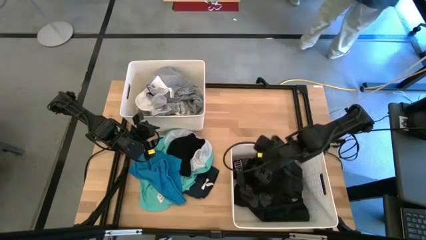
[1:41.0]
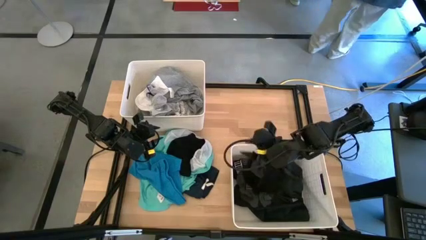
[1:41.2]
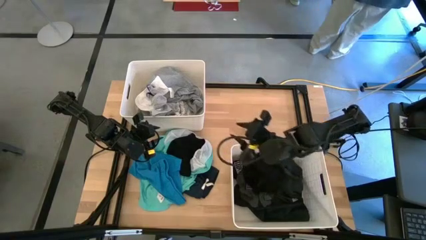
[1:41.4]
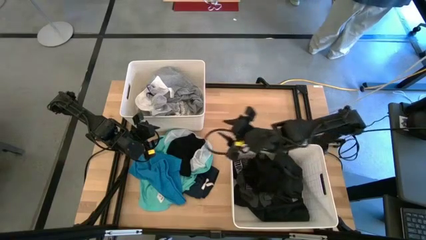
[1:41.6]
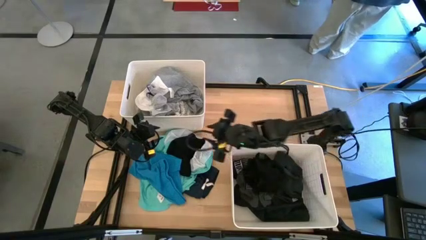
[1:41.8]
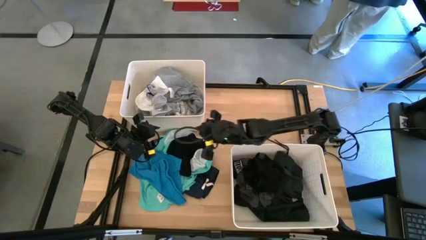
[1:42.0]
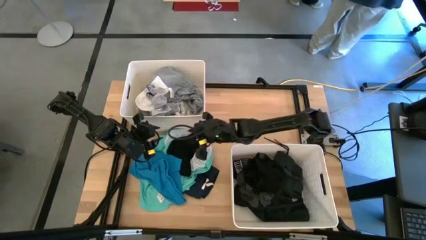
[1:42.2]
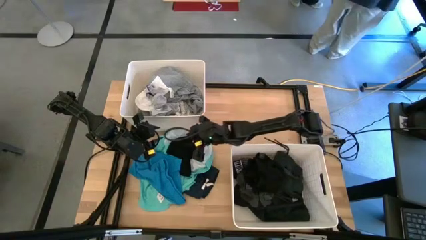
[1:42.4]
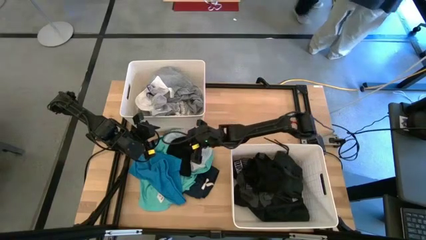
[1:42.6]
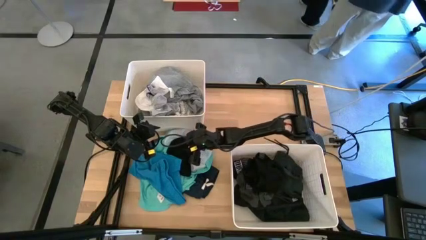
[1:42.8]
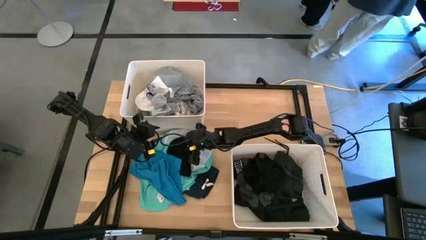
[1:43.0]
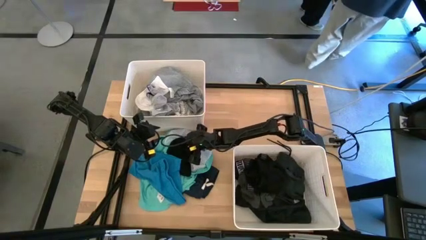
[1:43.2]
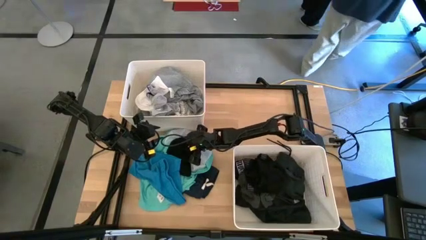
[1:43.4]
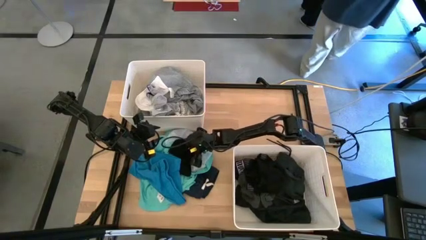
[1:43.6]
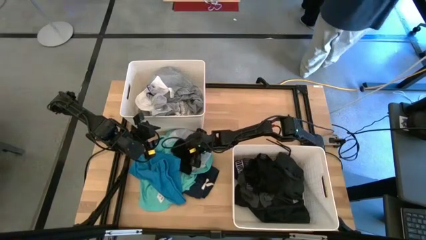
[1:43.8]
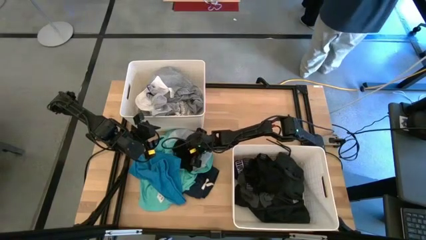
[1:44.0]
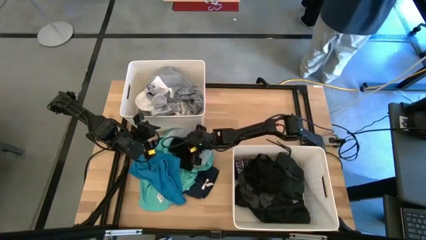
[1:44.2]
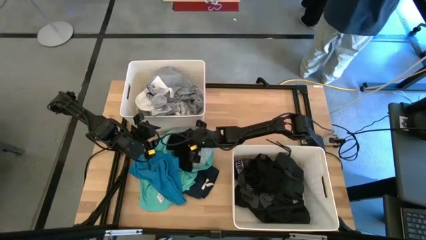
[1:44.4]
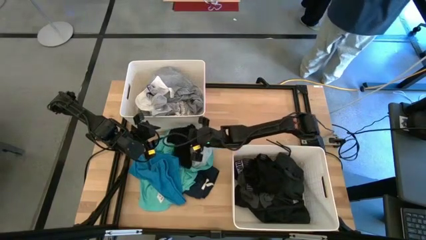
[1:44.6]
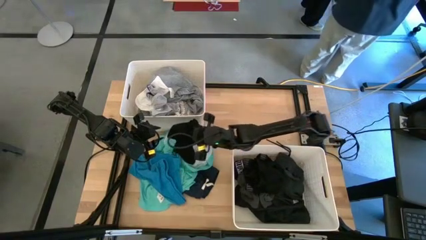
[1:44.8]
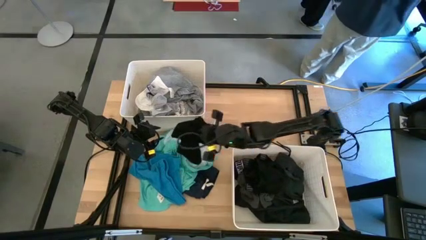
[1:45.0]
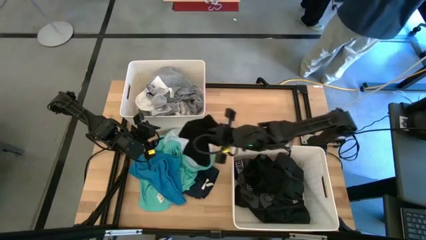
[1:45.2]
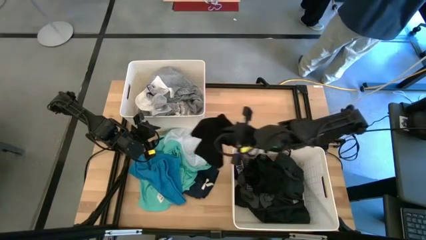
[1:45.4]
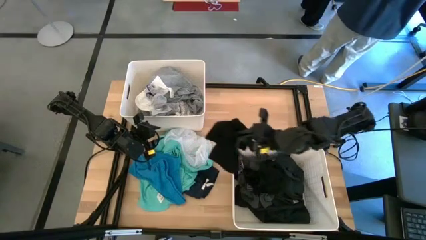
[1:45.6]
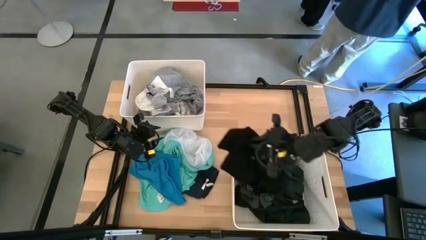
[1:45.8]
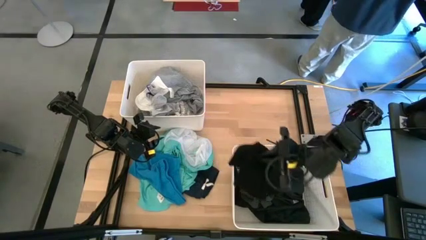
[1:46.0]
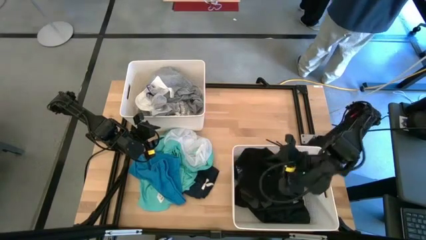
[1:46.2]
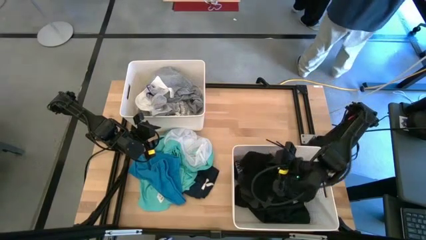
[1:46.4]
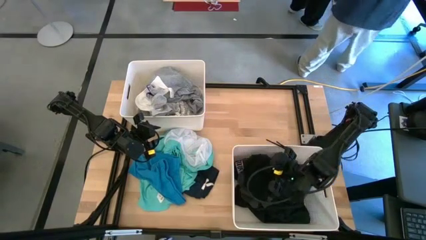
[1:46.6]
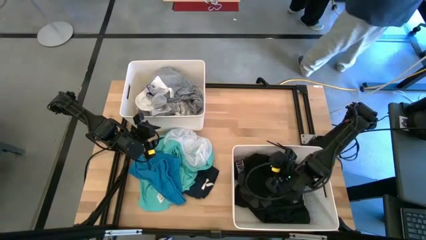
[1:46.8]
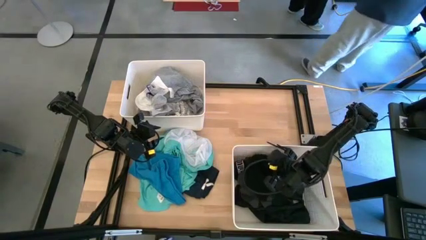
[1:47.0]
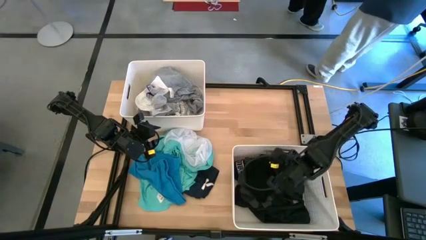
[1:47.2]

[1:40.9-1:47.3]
Task: Sort clothes
Put the black underwear into the bottom right laundry bin

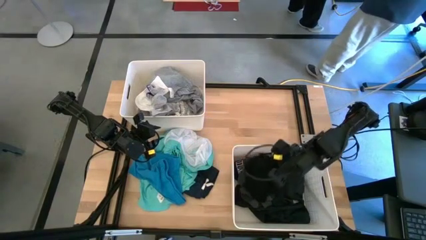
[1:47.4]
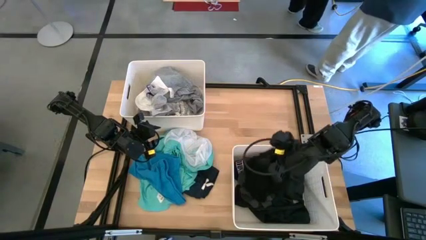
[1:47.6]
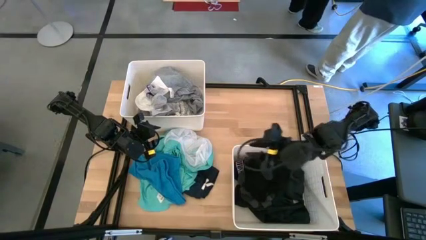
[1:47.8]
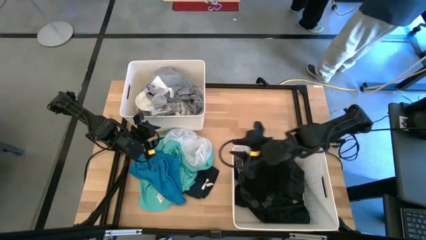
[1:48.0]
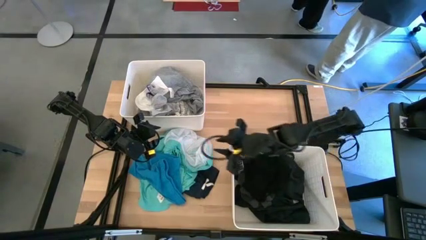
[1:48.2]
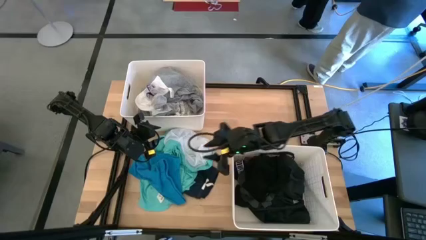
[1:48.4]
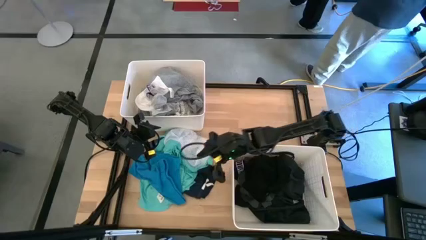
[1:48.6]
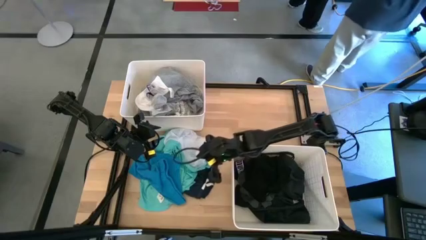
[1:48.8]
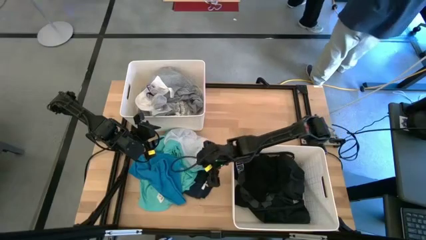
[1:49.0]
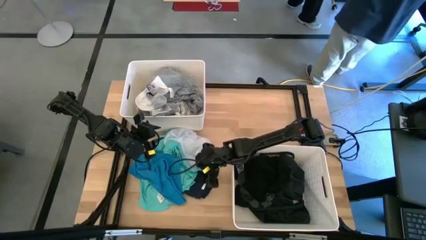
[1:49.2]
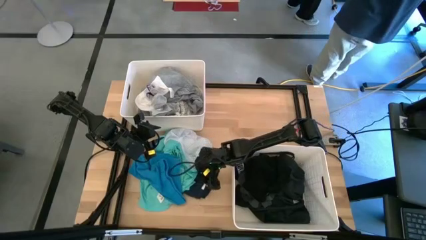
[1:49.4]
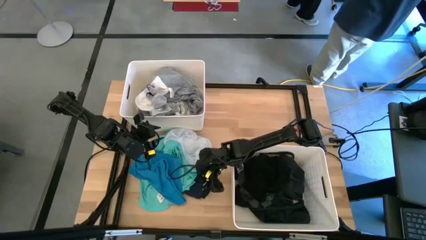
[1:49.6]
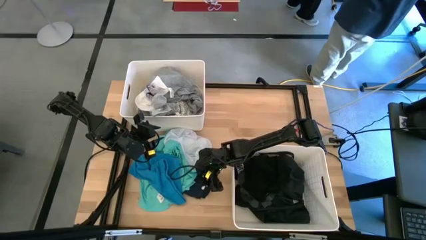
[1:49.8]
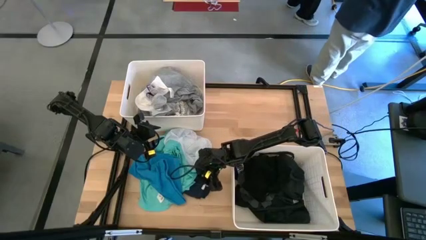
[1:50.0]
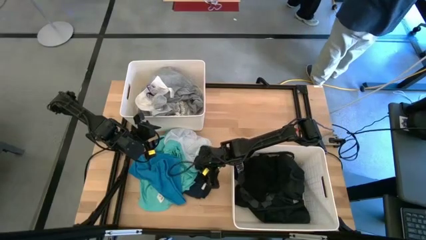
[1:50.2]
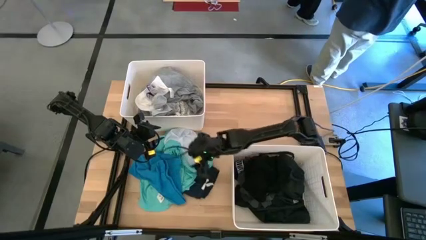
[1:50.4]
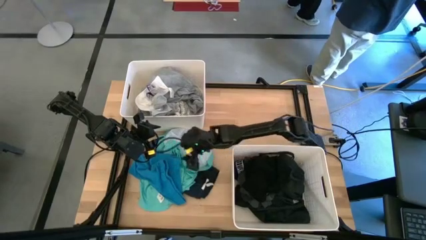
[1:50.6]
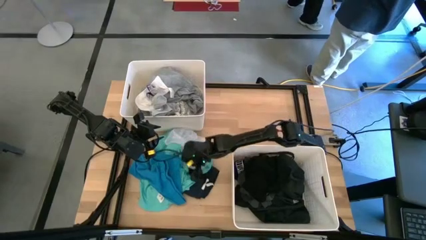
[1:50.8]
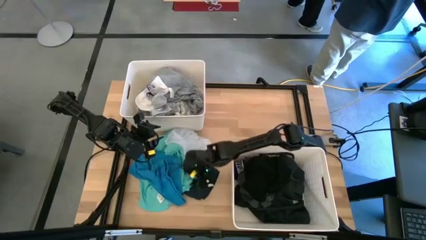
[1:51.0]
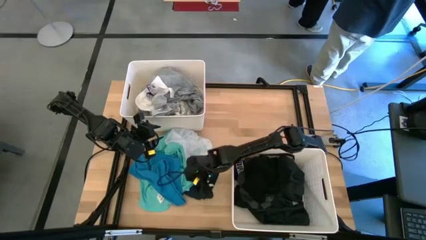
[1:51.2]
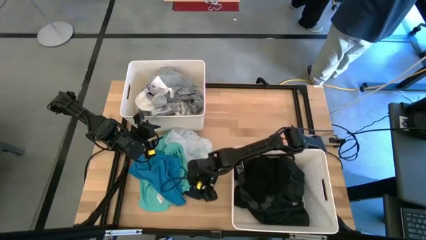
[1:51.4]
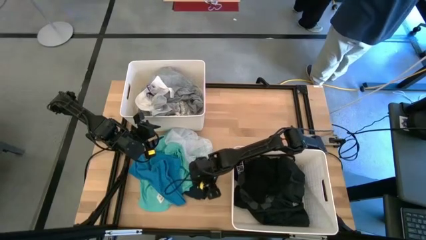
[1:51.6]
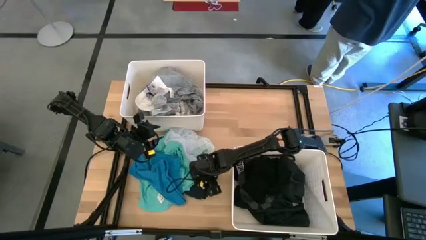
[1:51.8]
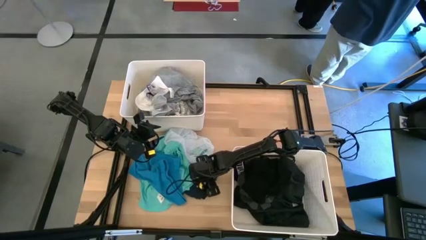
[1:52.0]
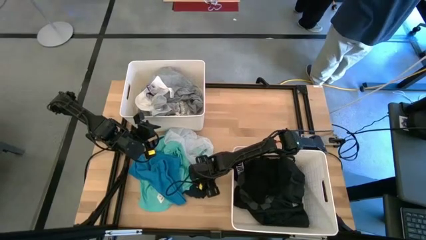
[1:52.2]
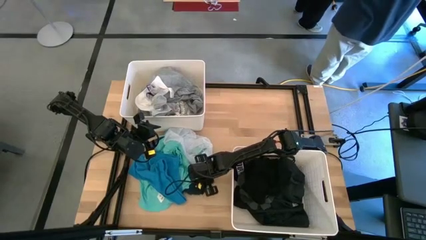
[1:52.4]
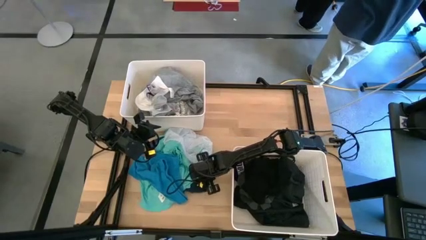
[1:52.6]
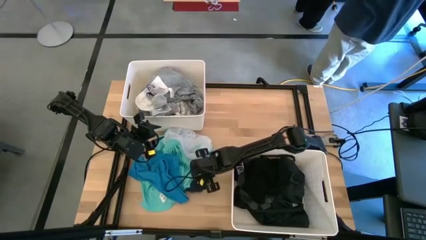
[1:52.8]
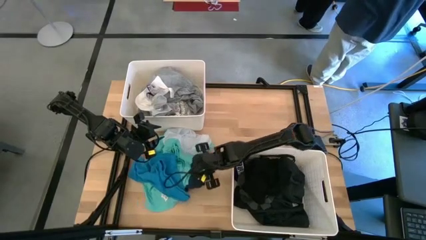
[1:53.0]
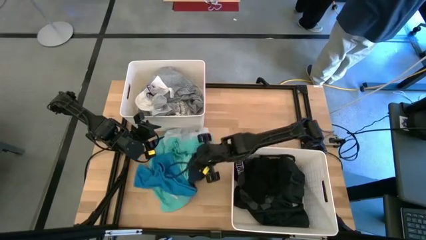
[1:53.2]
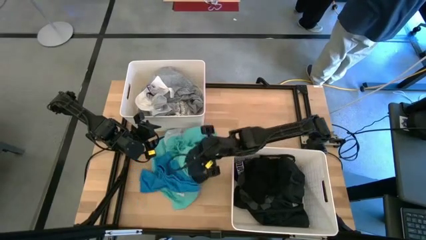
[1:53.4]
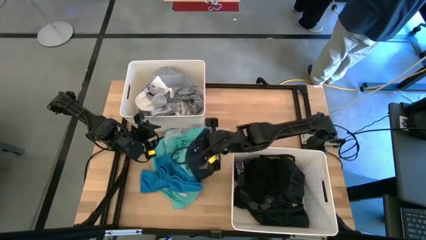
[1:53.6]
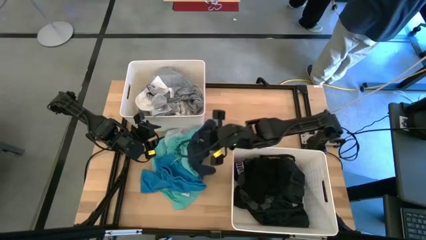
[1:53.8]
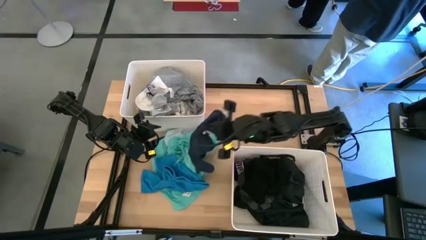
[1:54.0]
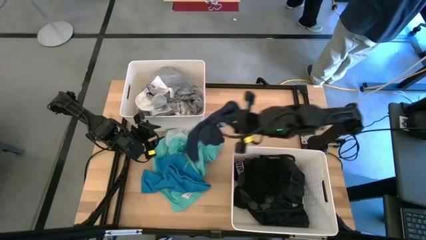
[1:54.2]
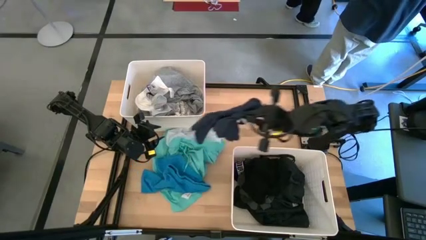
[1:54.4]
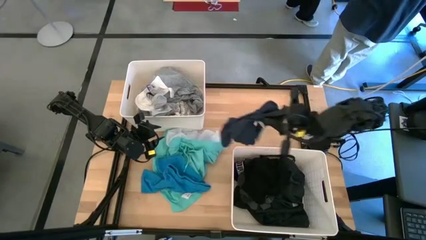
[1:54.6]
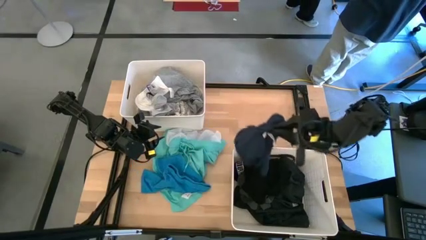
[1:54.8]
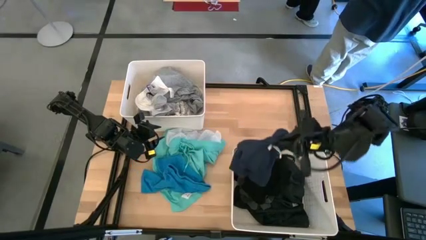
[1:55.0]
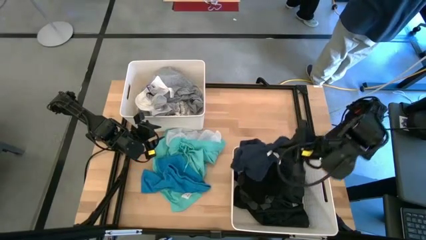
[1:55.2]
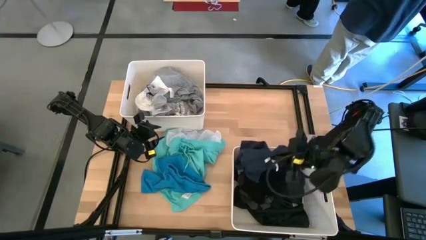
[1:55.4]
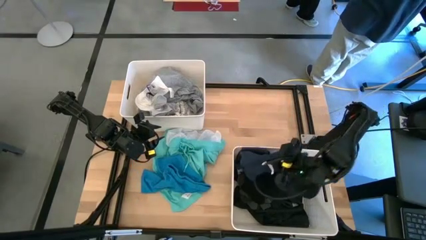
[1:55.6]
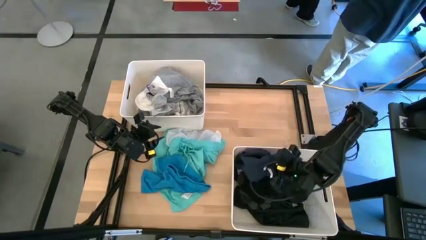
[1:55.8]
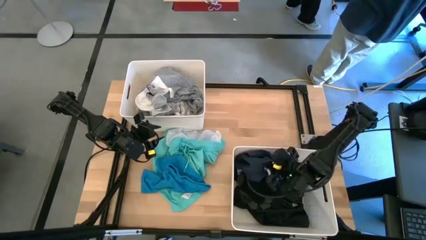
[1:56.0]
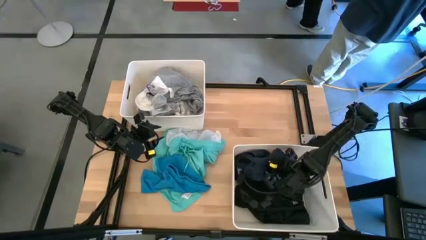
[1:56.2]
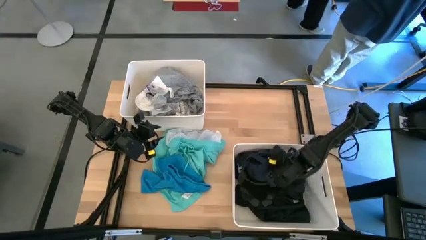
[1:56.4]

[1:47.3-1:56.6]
Put the black shorts into the bottom right laundry bin
